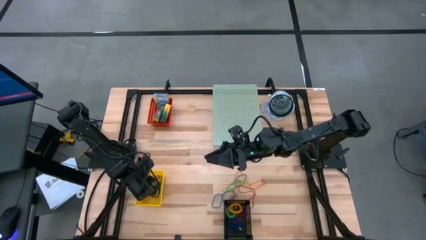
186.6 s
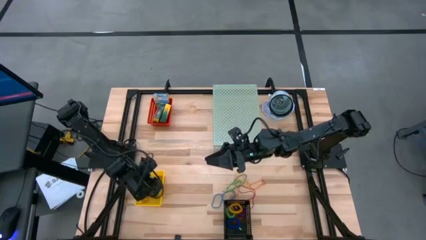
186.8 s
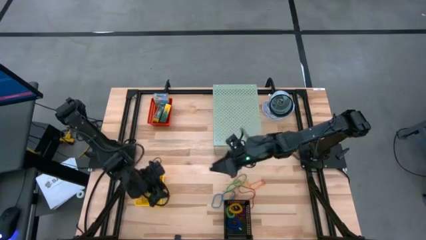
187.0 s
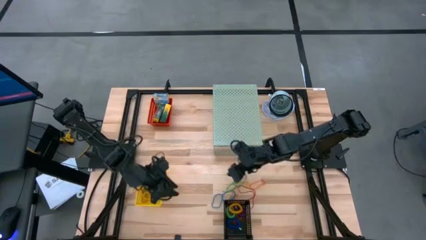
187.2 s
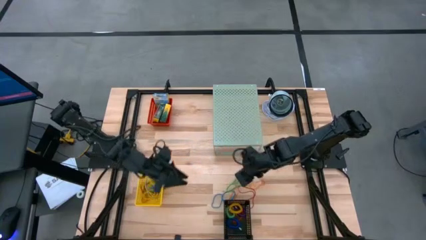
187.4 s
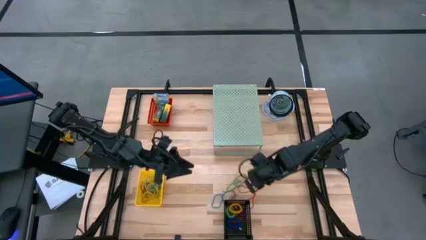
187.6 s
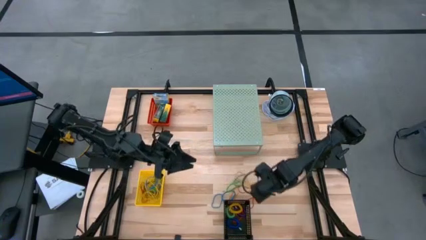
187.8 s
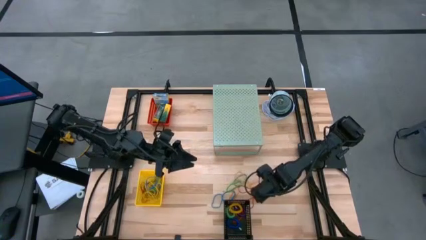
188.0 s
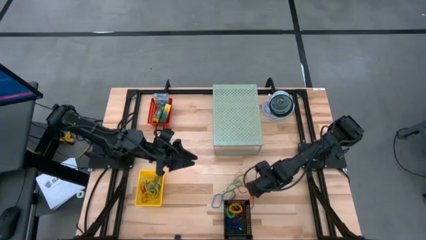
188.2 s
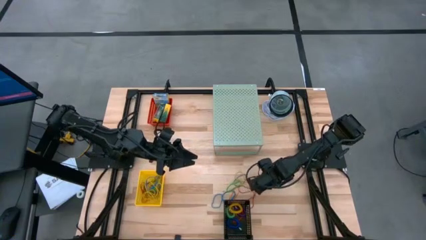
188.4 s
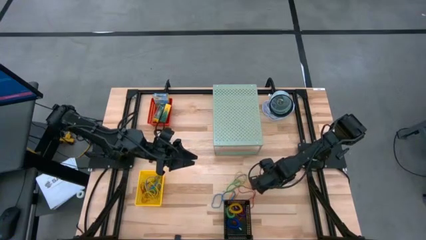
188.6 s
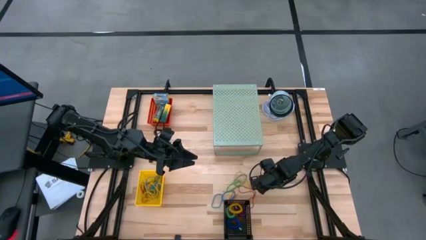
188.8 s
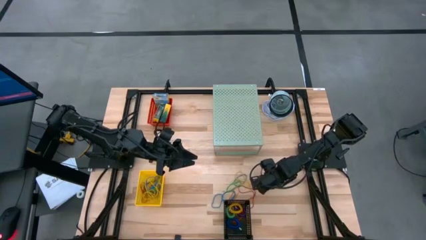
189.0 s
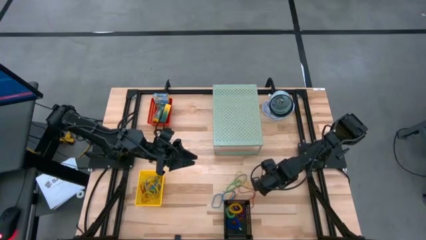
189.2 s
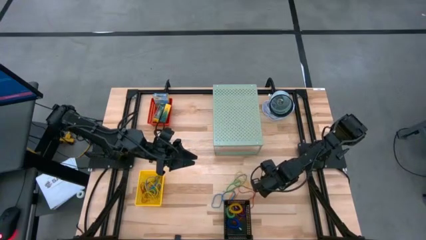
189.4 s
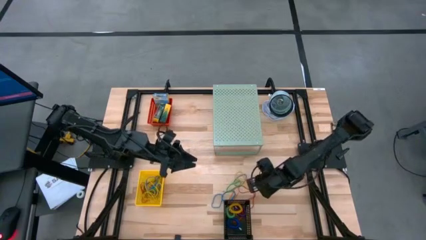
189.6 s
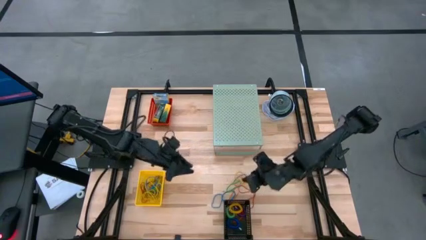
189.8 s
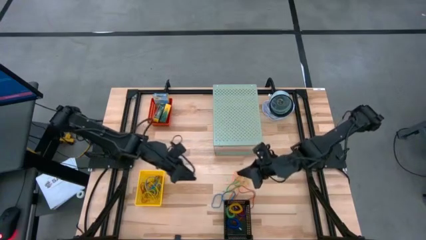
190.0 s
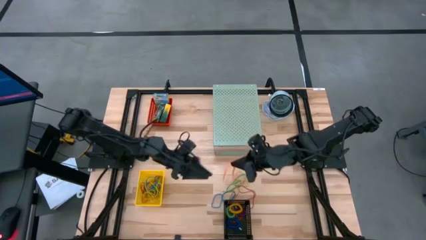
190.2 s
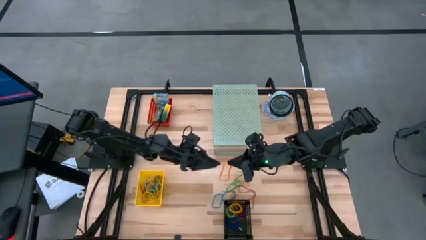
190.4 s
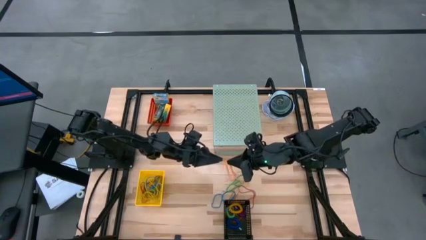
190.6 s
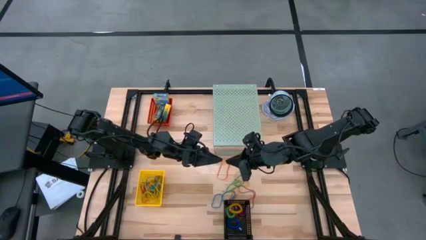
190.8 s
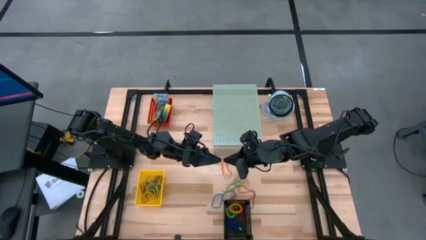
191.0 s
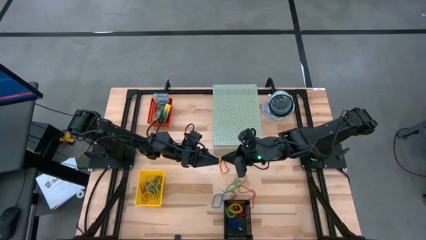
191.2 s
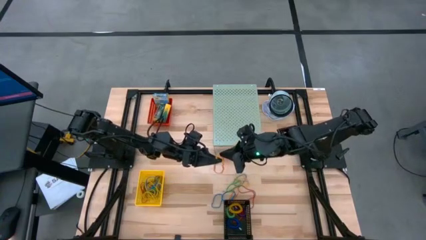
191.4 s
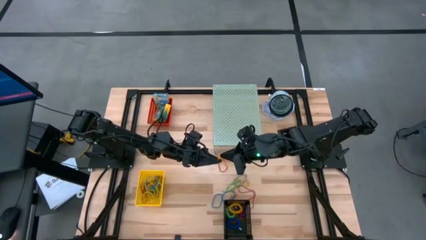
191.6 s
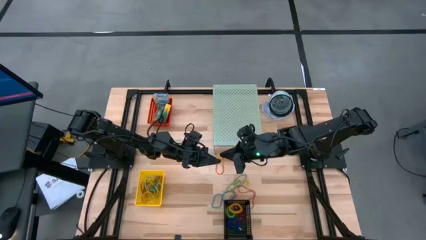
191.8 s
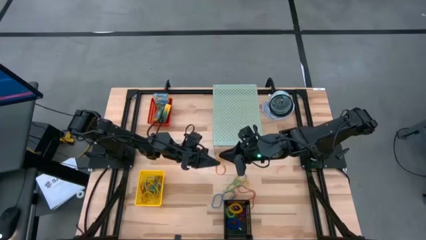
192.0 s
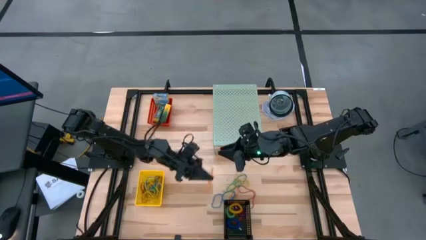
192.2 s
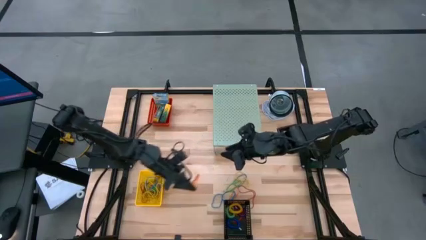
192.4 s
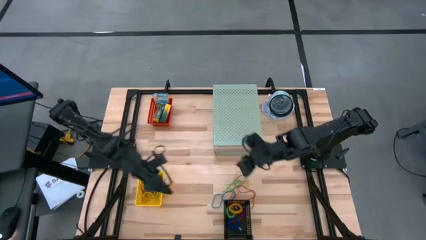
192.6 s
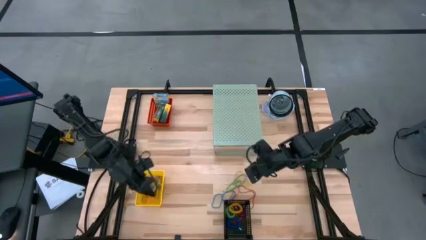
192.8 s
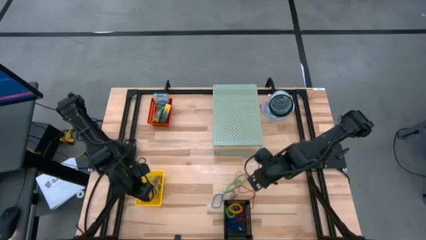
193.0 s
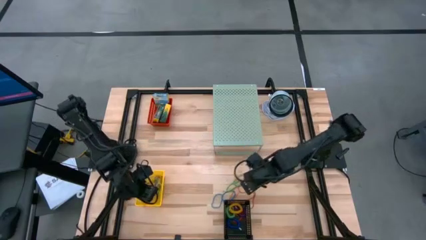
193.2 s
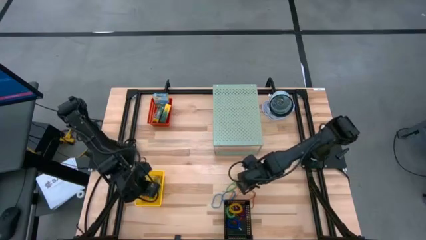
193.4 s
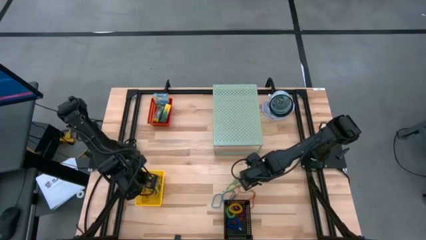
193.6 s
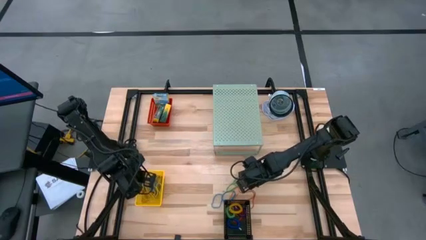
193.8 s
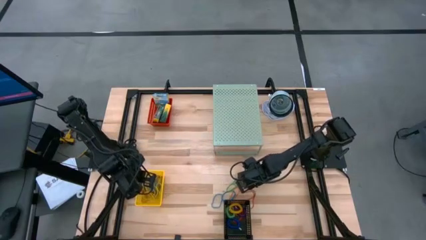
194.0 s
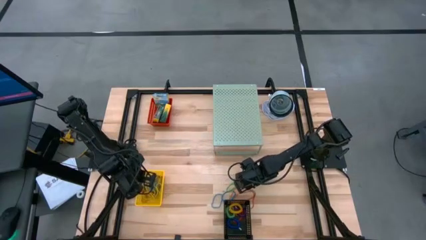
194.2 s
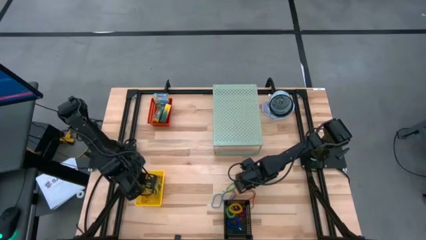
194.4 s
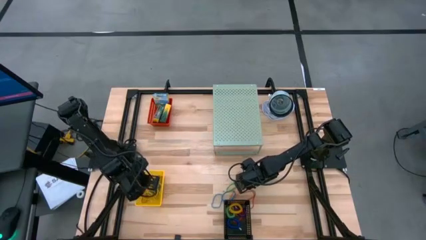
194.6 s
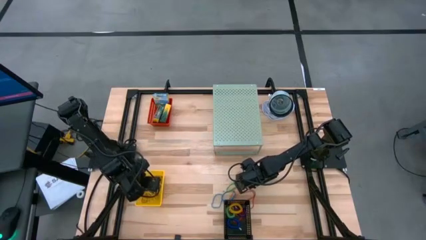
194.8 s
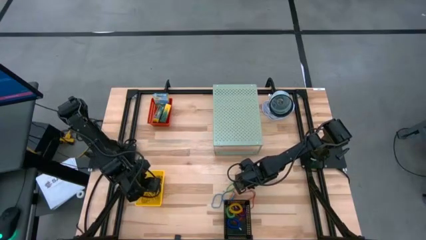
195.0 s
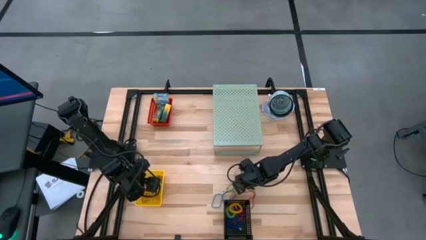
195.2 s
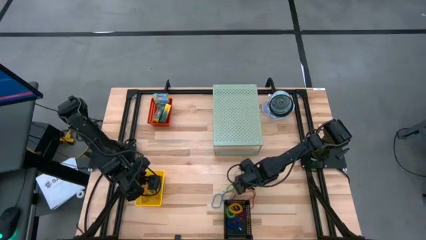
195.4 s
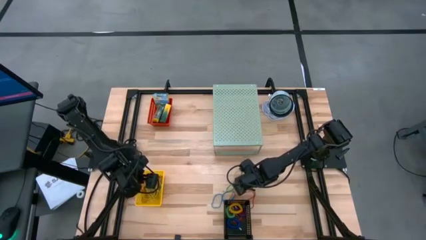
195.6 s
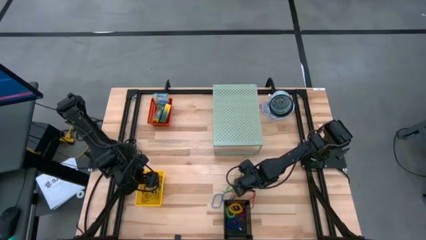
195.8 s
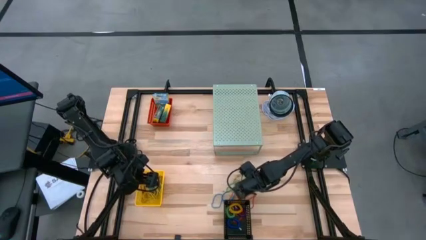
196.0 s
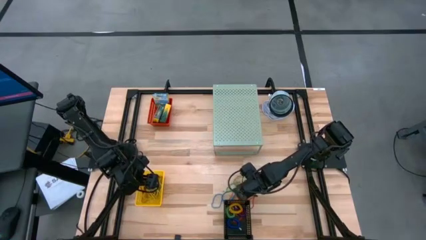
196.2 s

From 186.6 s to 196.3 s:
Task: Pick & Place Office Desk Supplies
Put the orange rubber band into the yellow bin

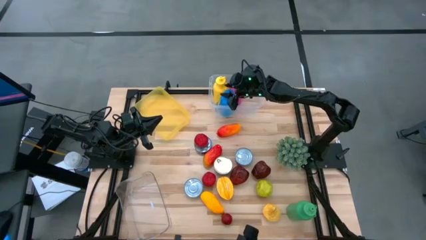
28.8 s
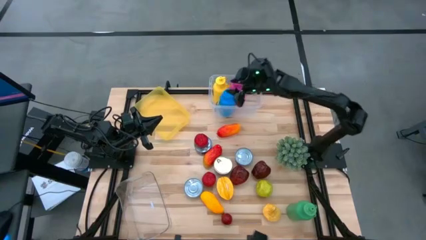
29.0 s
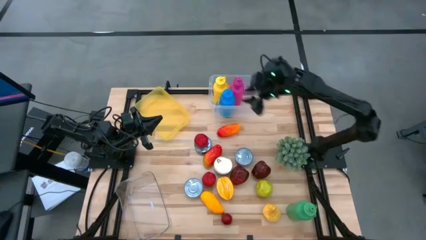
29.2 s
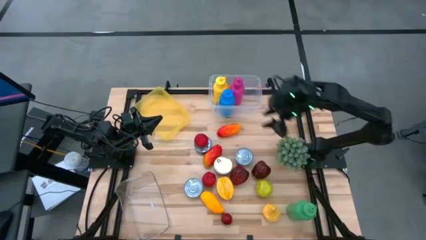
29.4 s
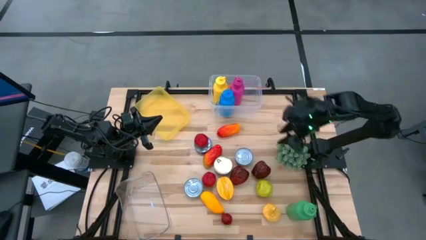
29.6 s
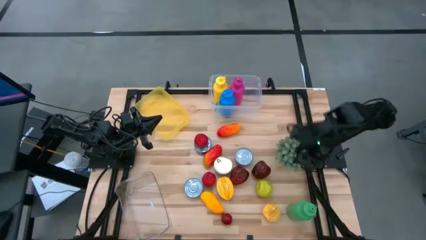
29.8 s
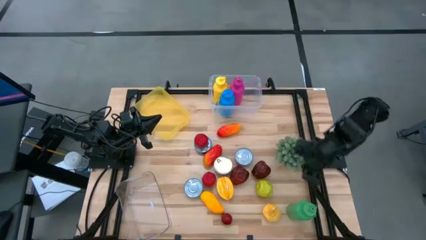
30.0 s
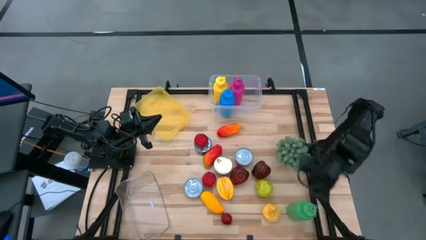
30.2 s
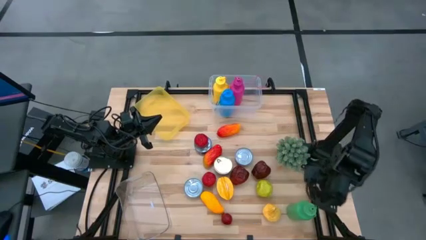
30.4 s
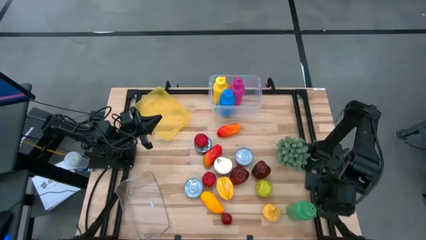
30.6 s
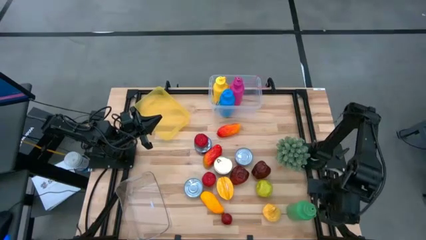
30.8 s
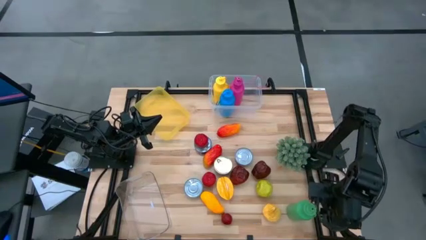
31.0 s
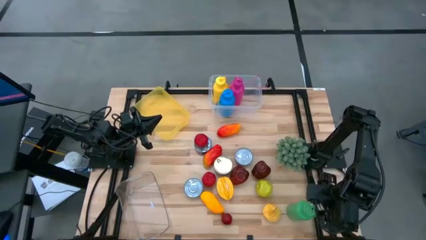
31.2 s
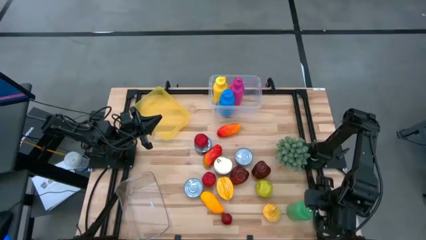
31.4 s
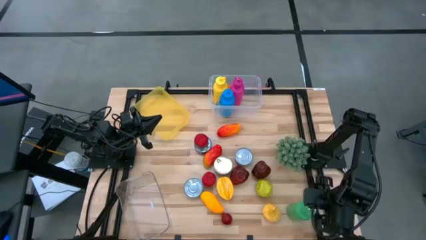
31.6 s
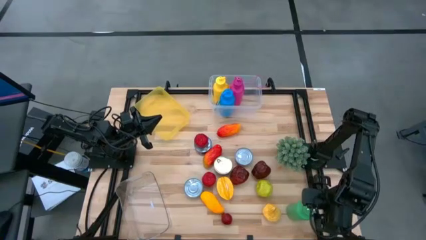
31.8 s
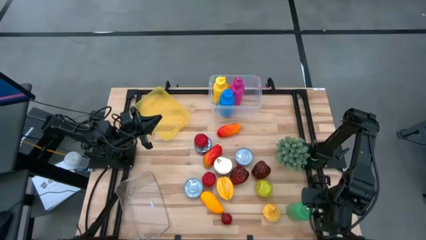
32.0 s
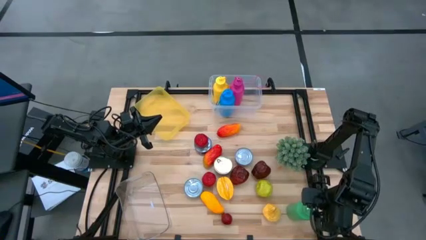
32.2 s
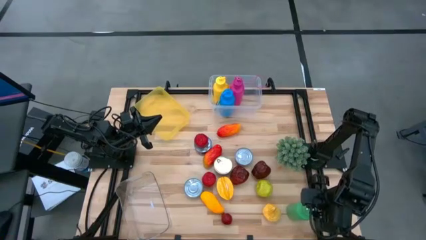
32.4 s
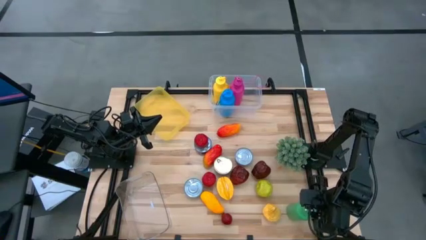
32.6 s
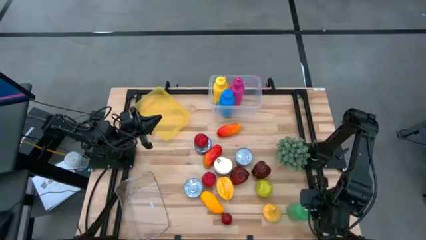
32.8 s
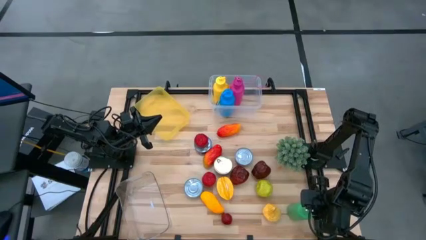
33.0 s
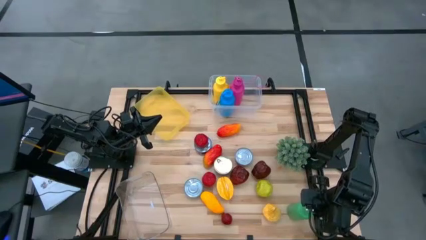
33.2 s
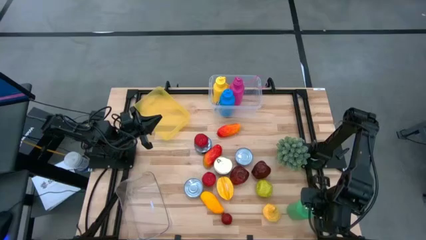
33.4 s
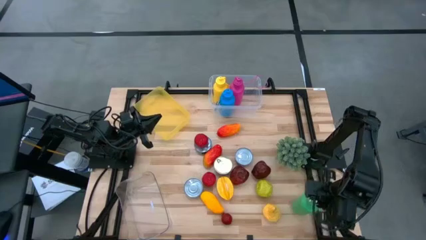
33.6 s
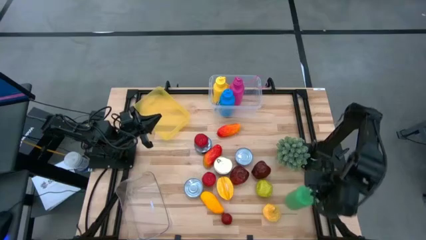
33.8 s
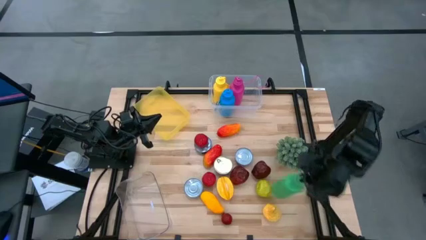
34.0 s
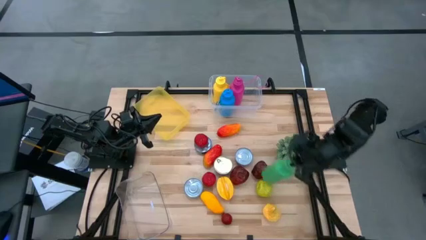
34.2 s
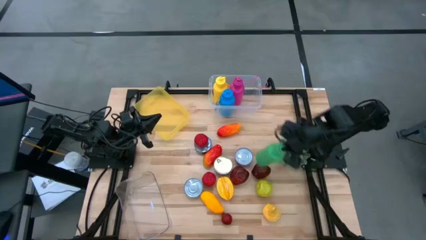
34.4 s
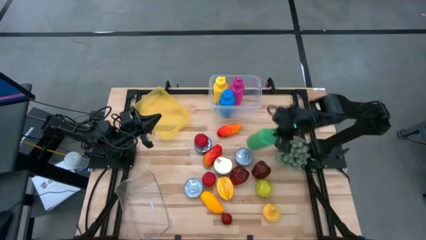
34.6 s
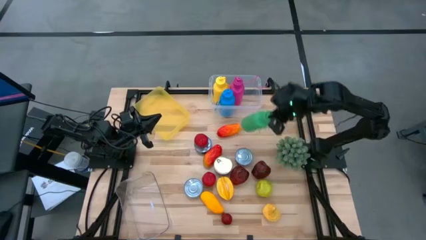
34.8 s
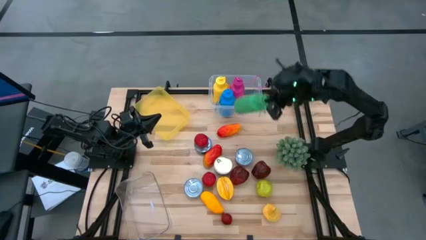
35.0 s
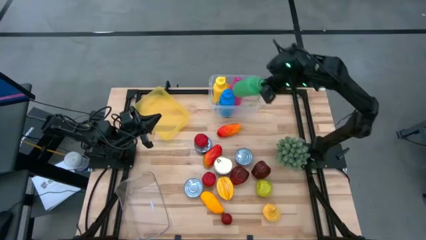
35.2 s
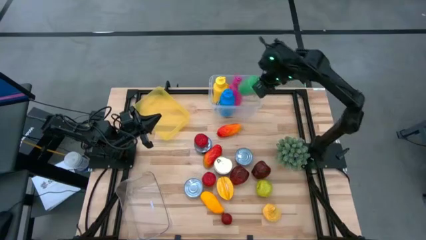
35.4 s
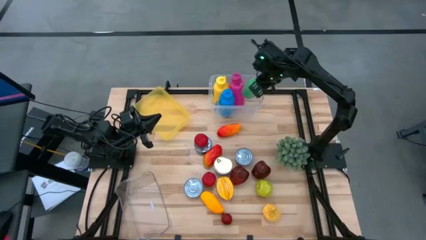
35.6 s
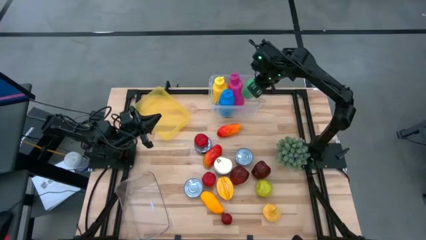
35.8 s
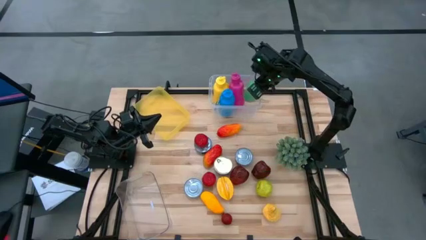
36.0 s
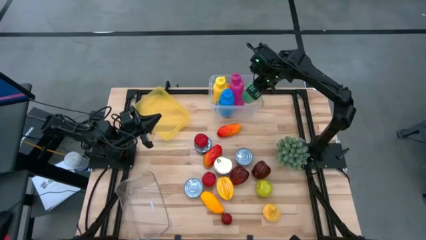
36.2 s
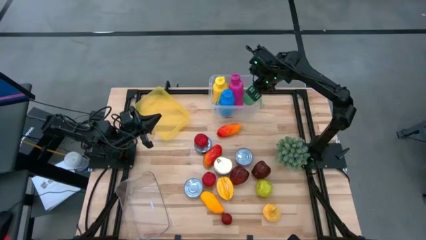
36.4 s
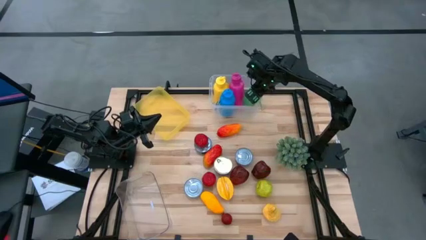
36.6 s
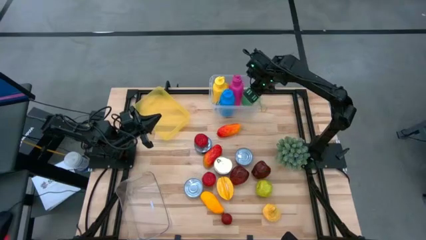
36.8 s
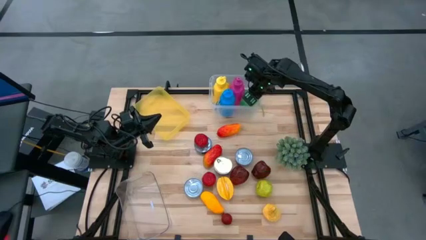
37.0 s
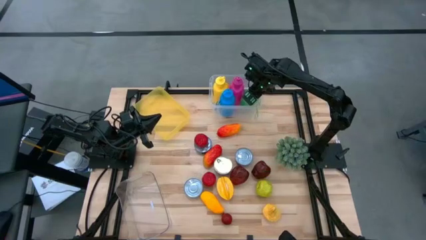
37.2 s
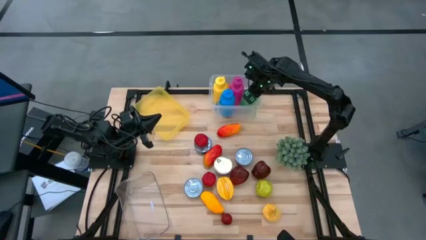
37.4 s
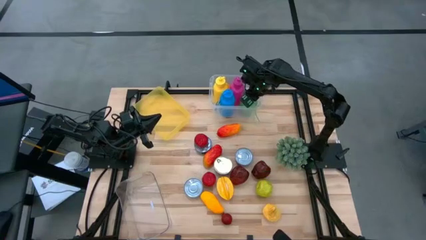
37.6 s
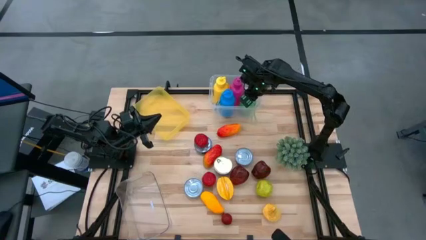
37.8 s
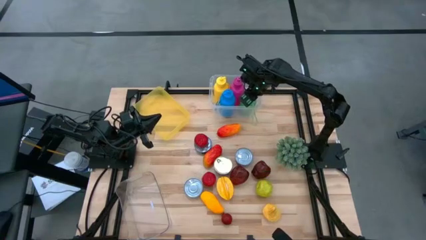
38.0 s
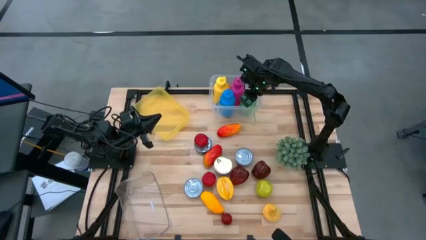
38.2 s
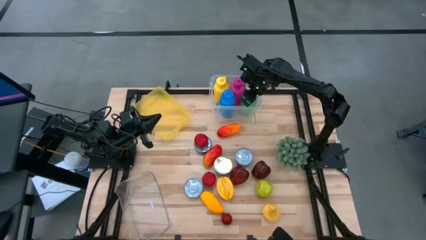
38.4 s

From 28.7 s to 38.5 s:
Task: Pick & Place Food Item
Put the green water bottle into the white transparent bin
